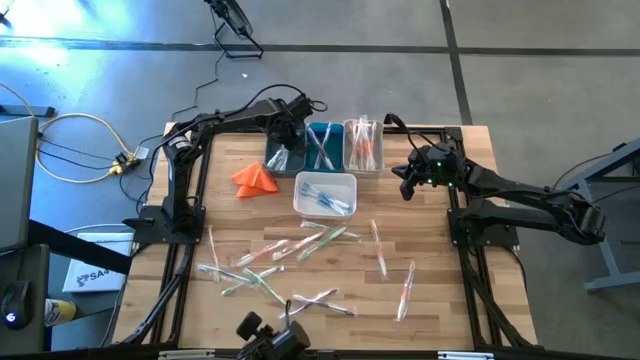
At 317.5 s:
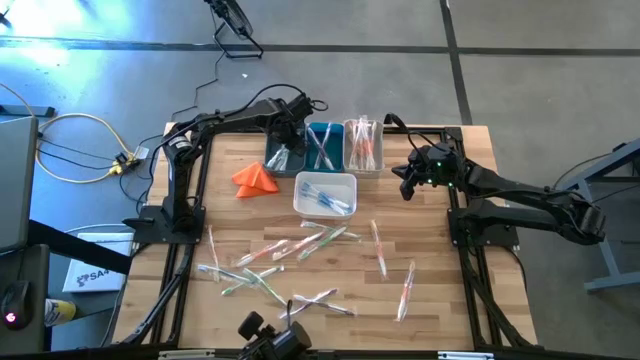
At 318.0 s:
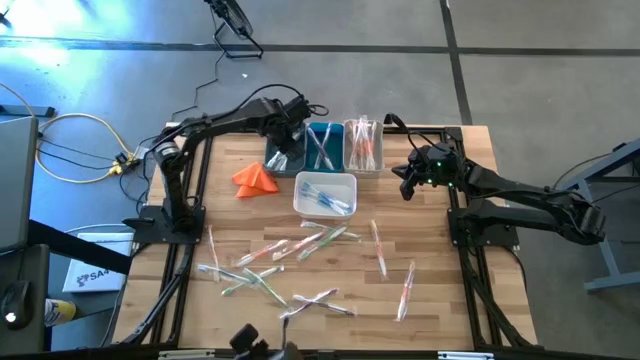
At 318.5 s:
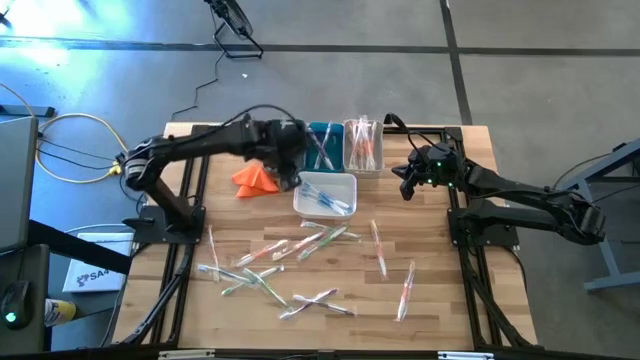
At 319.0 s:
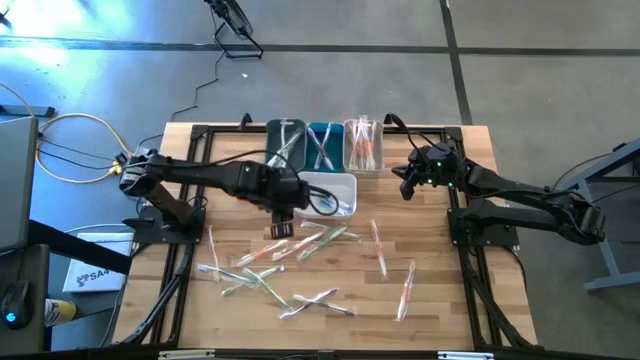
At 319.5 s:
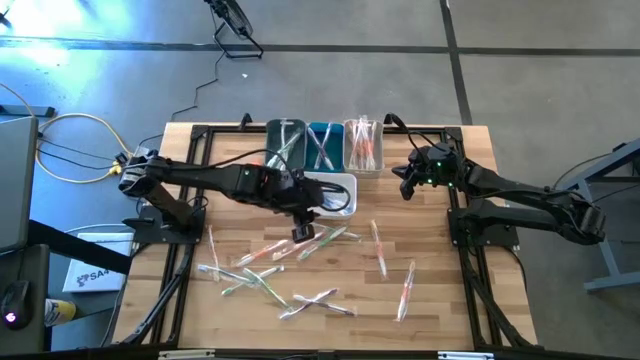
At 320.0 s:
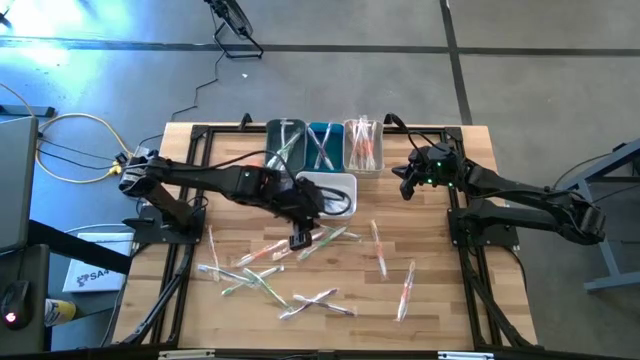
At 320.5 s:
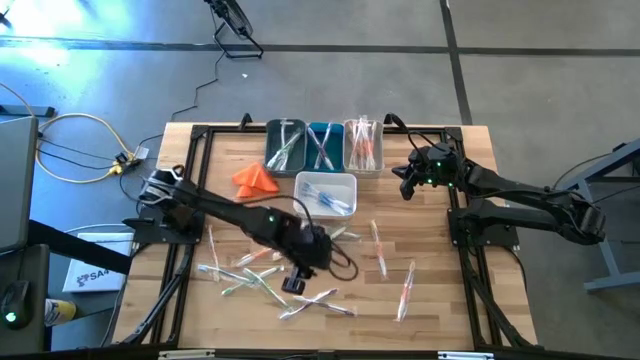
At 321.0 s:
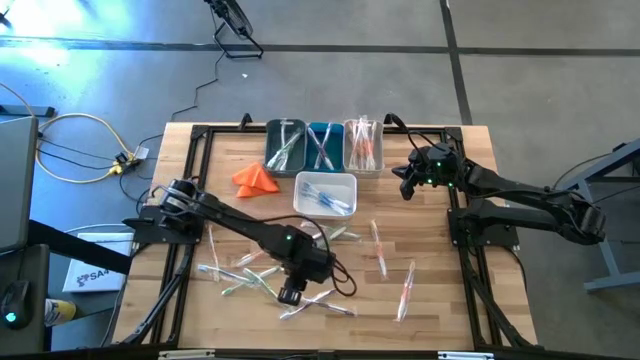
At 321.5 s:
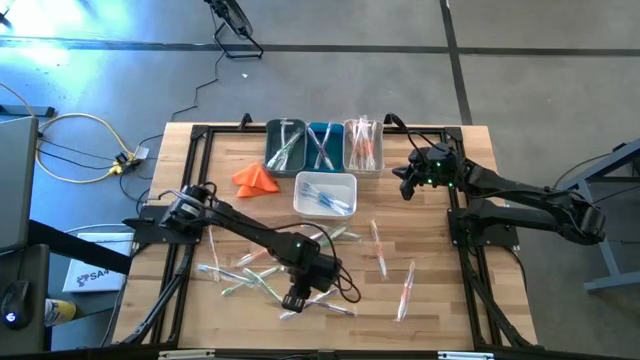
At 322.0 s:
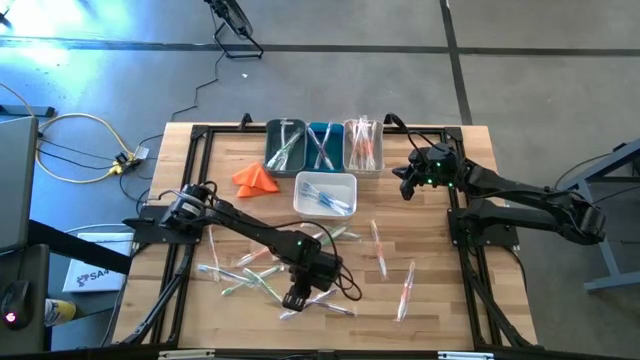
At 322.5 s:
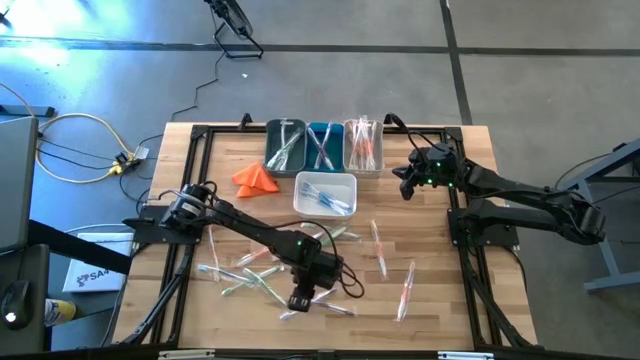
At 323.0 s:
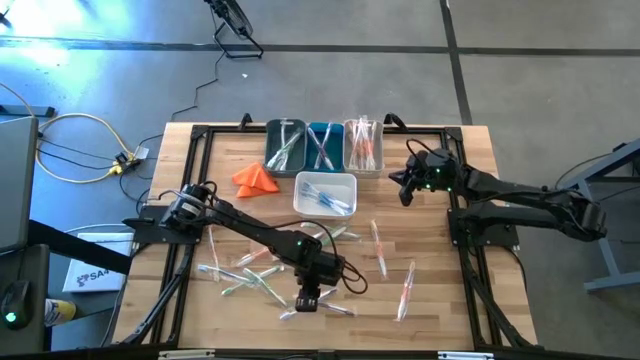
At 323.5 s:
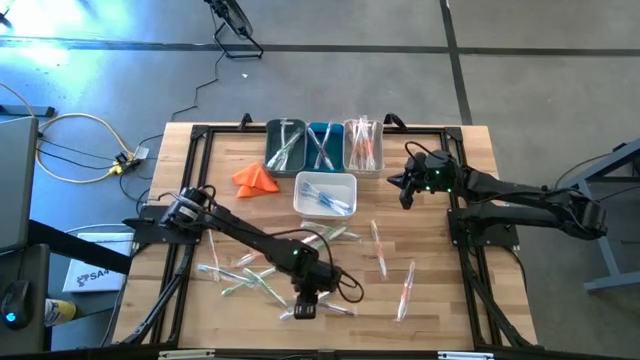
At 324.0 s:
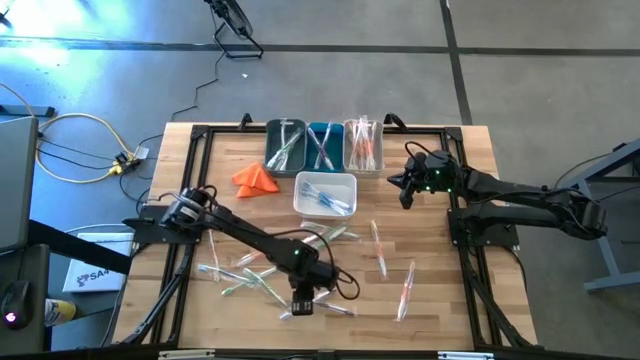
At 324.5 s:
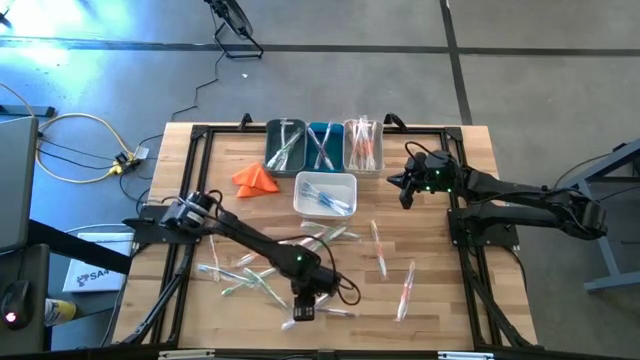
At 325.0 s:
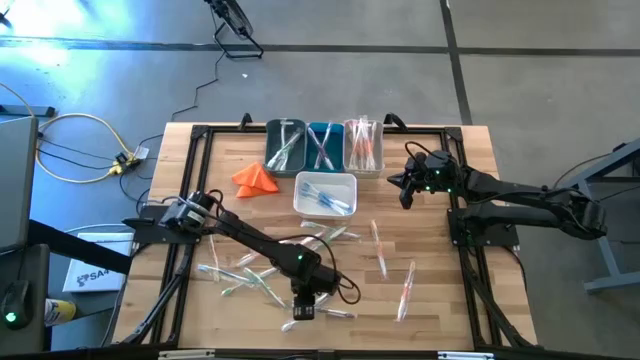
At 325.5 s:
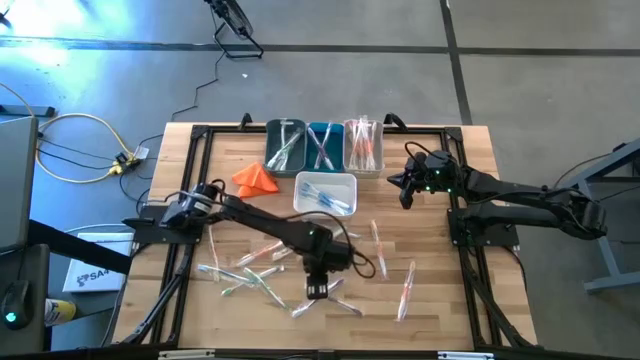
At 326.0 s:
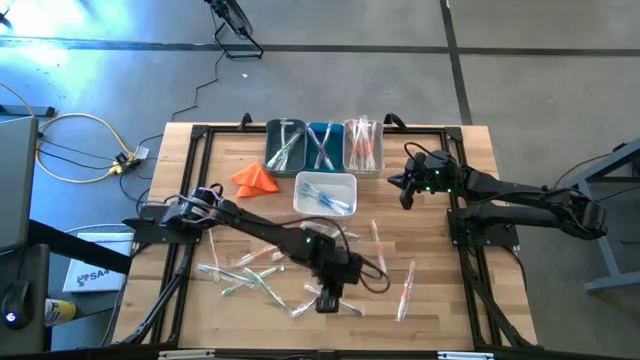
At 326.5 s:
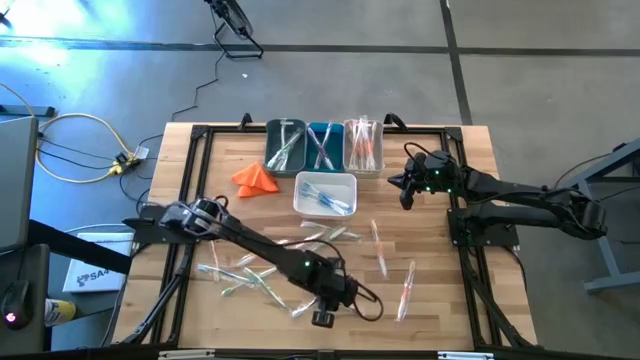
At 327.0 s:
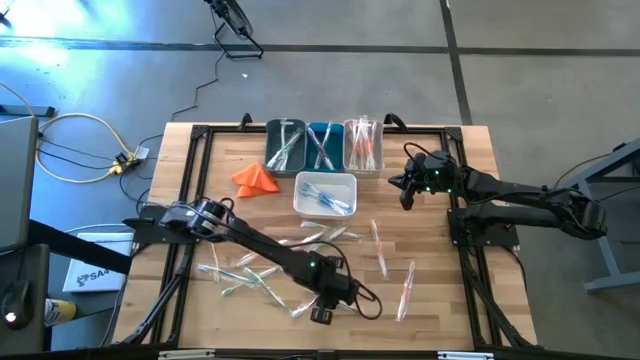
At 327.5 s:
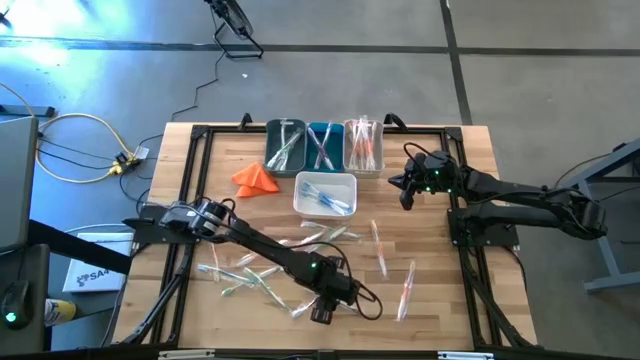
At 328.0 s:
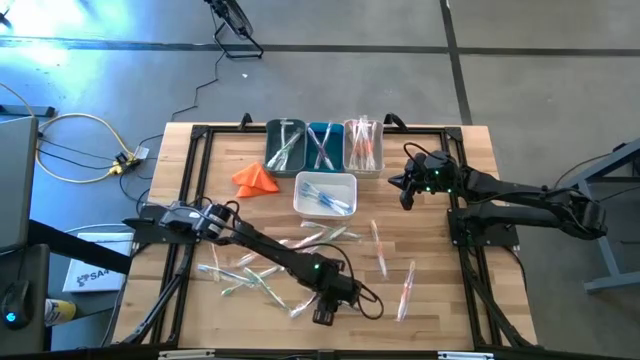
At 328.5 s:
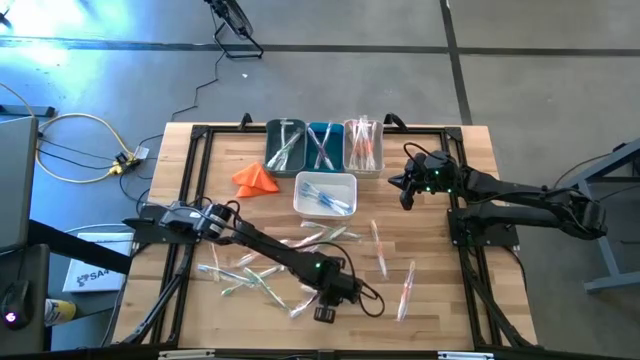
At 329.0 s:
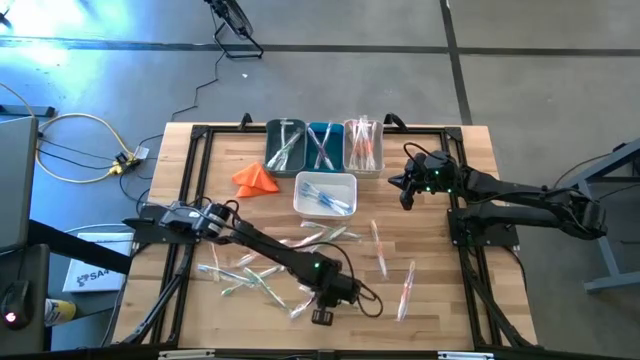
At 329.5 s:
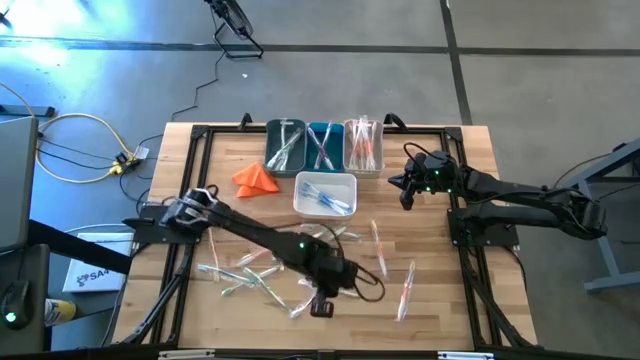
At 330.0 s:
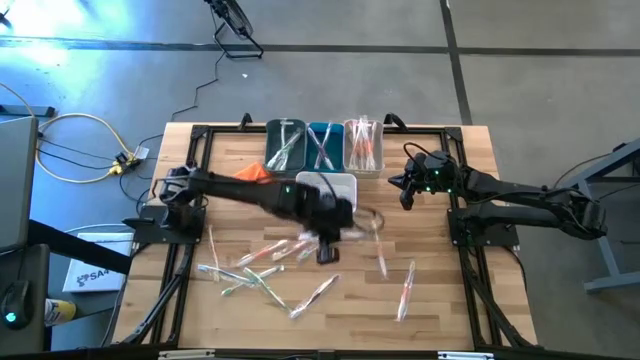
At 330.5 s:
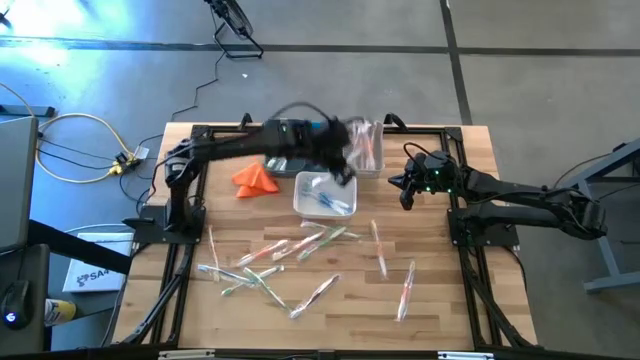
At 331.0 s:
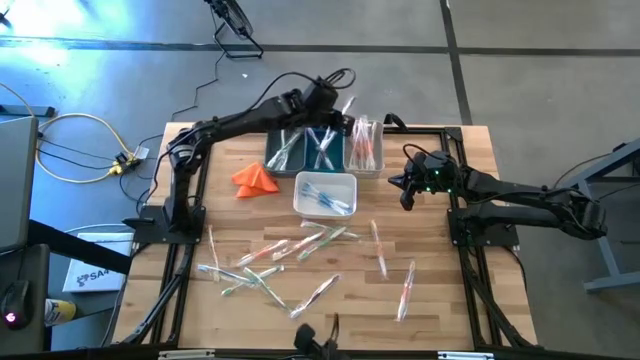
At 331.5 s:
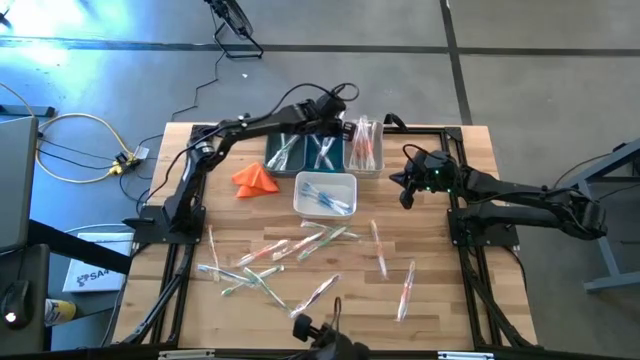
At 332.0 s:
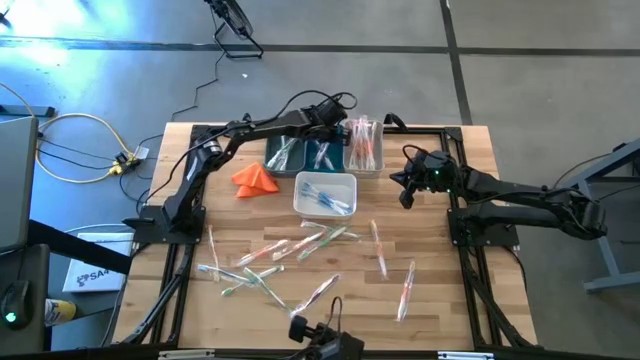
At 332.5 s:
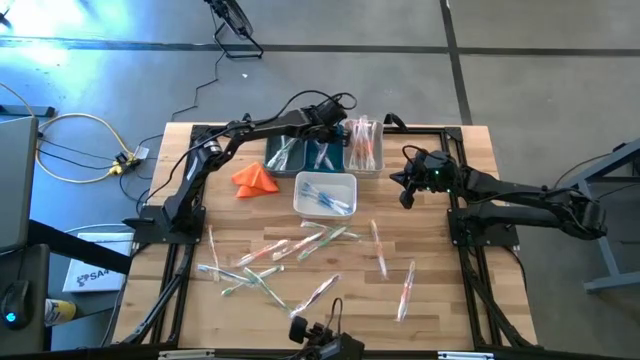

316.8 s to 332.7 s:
Task: Pick & Place Toothbrushes
Put the purple toothbrush into the blue bin

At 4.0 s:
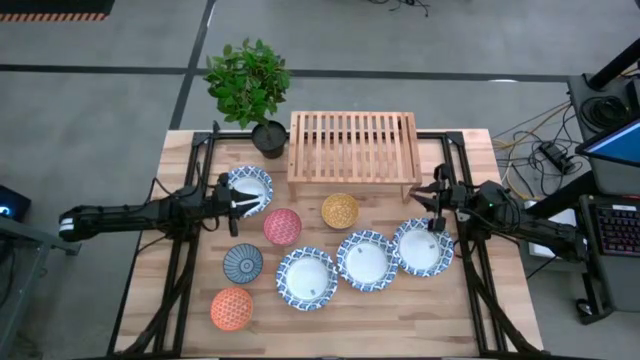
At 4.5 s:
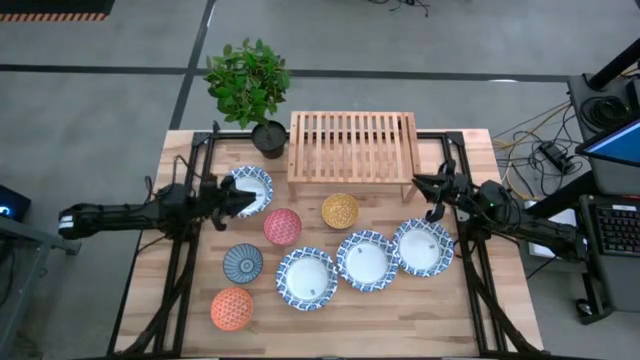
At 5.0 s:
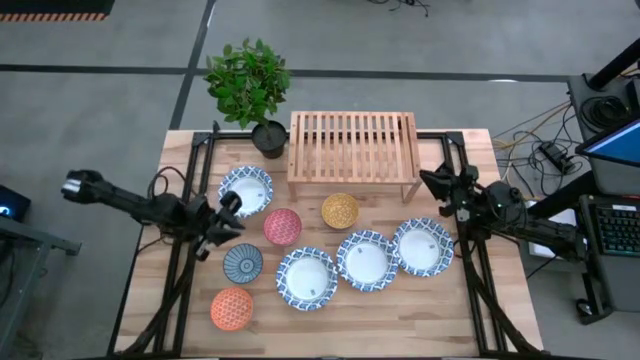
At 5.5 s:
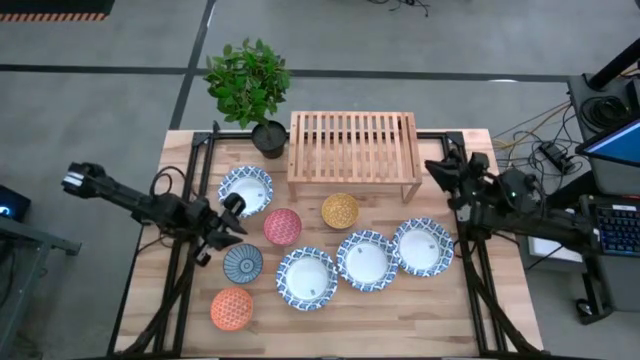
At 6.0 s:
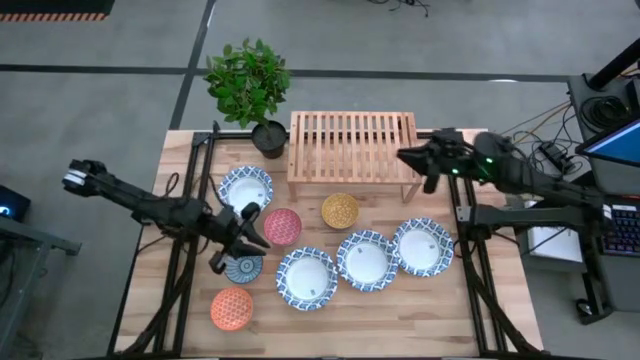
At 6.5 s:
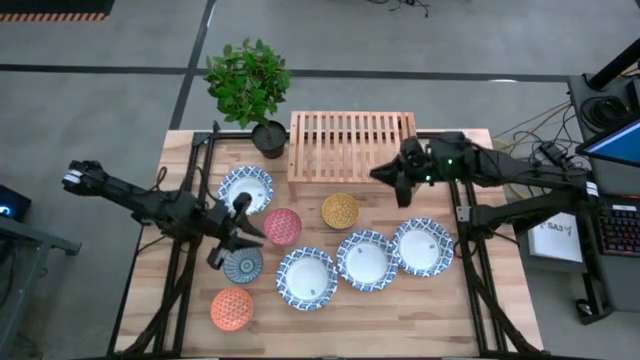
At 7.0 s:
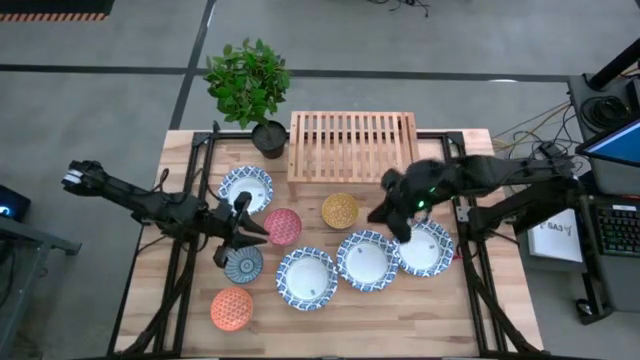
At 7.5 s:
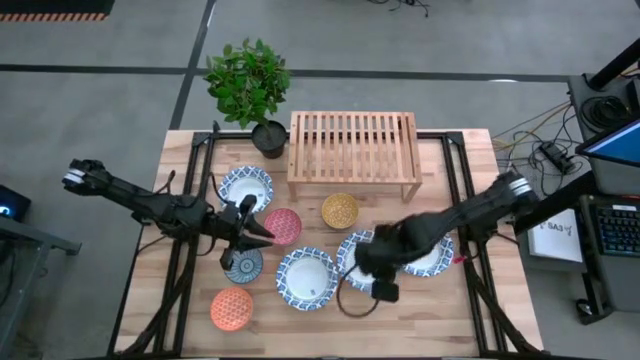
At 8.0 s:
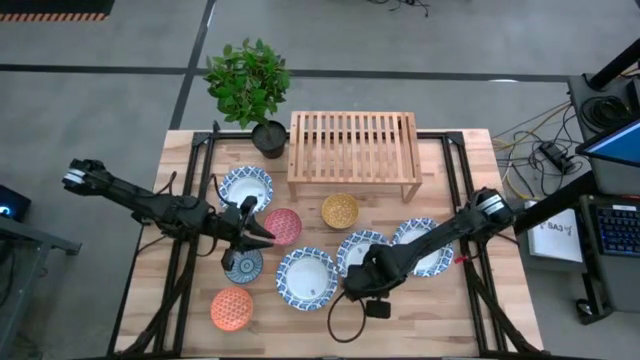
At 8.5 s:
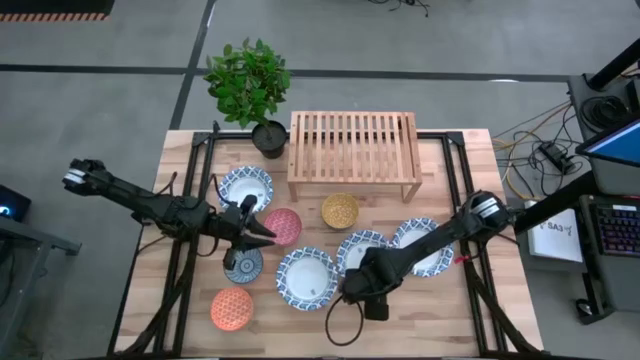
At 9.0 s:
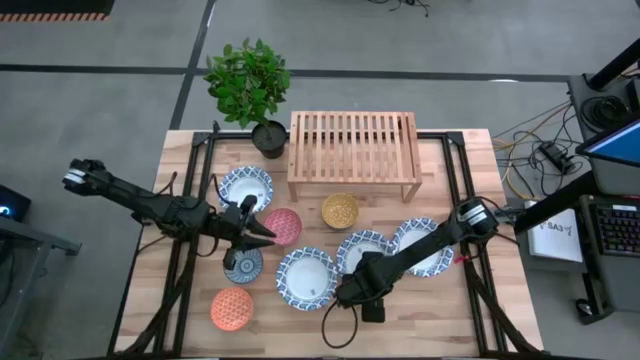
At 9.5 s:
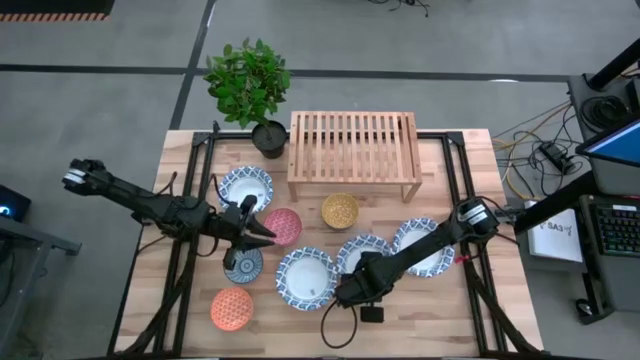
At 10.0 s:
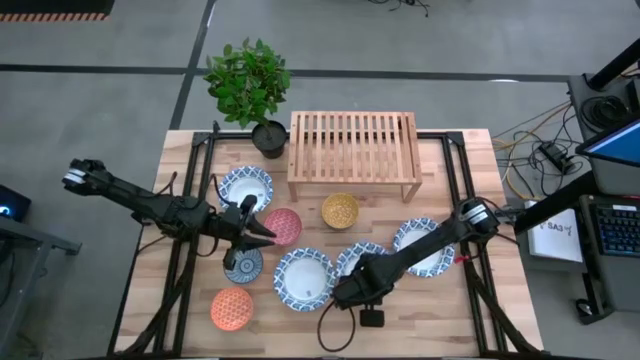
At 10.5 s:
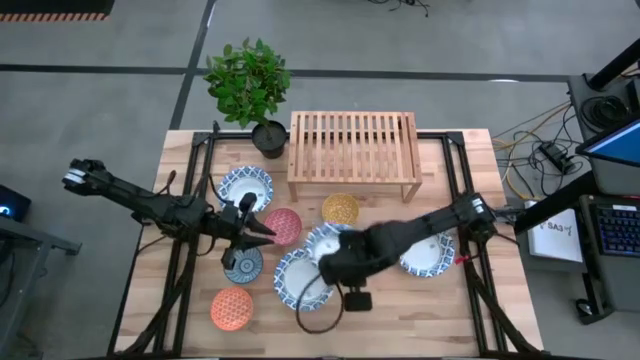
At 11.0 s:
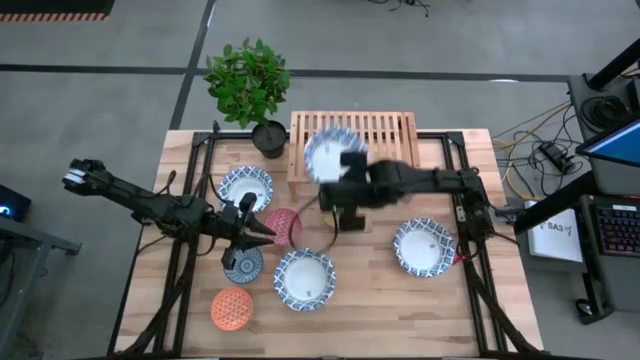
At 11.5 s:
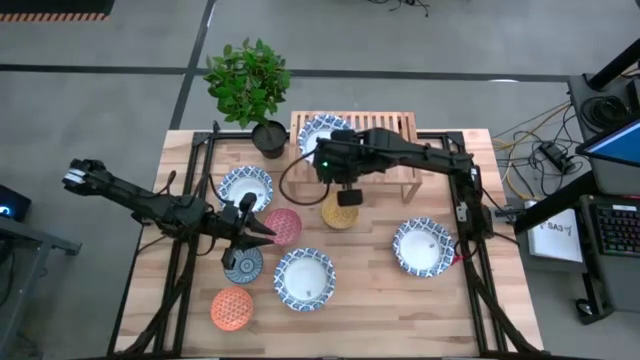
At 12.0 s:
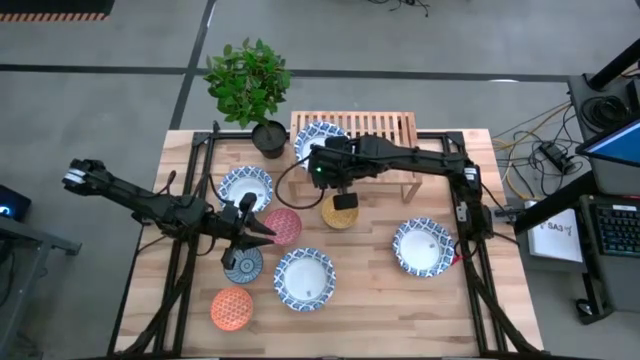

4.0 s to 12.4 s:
Task: Place and stack bowls onto a shelf
Put the bottom center white blue patterned bowl on the shelf
